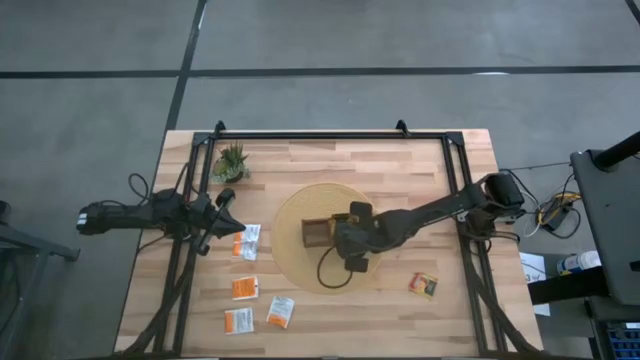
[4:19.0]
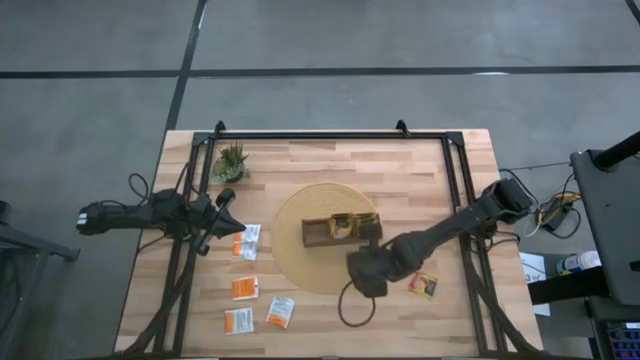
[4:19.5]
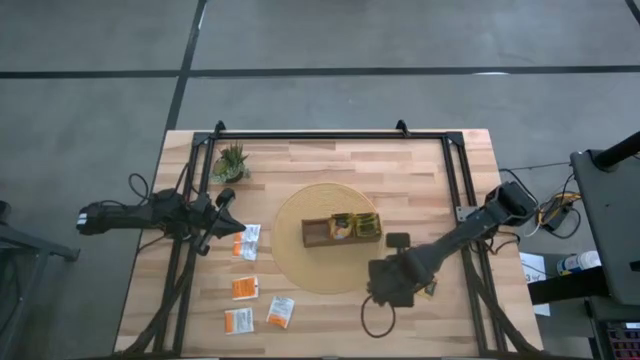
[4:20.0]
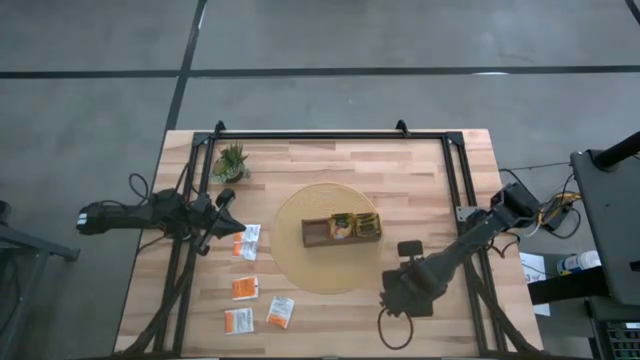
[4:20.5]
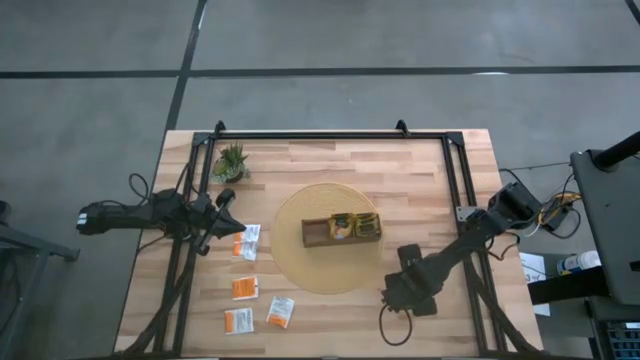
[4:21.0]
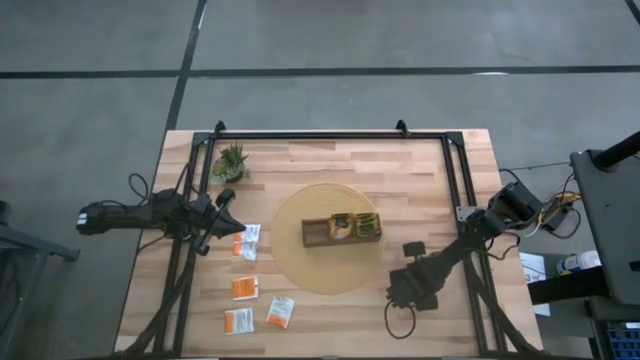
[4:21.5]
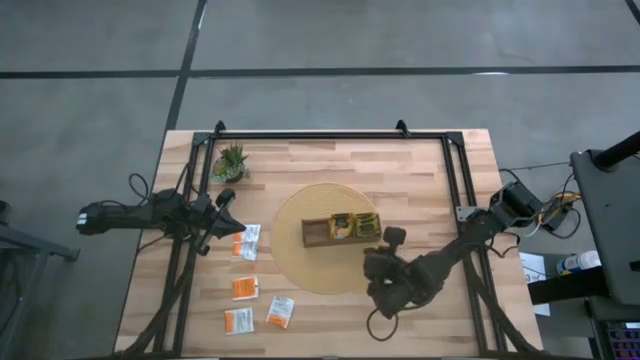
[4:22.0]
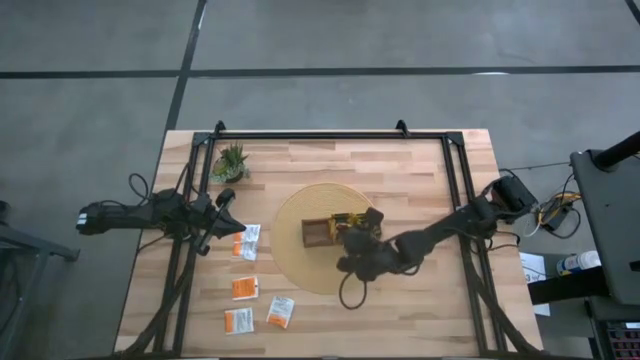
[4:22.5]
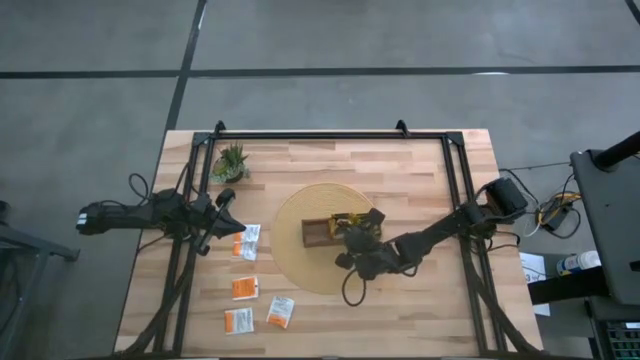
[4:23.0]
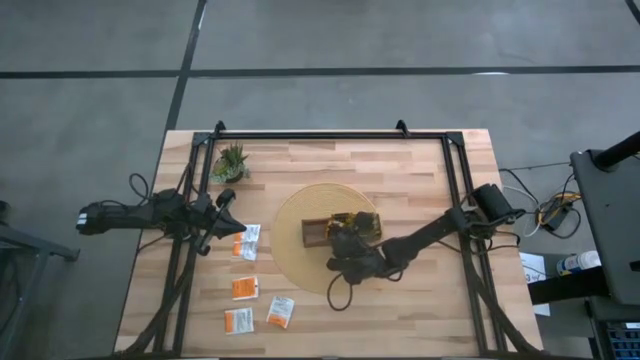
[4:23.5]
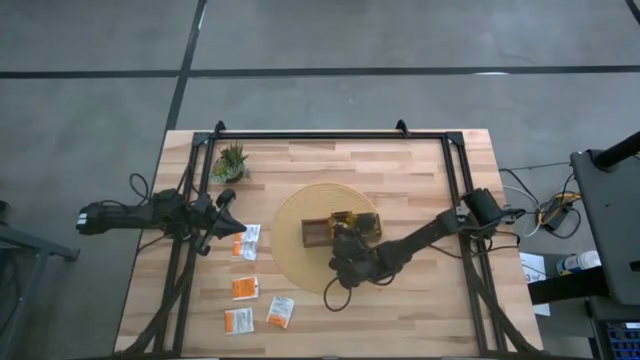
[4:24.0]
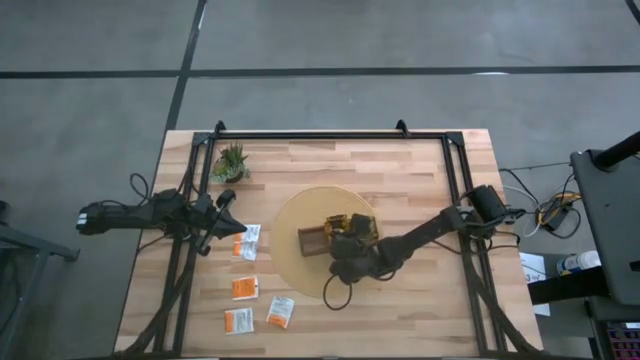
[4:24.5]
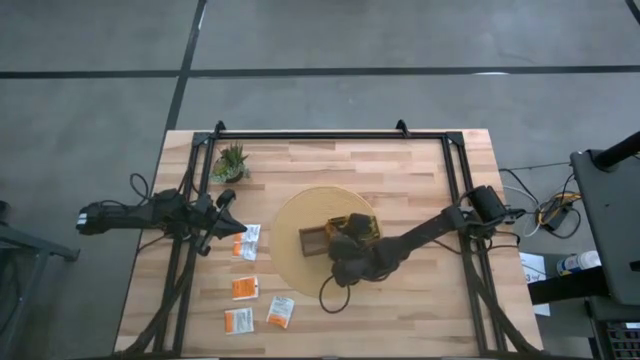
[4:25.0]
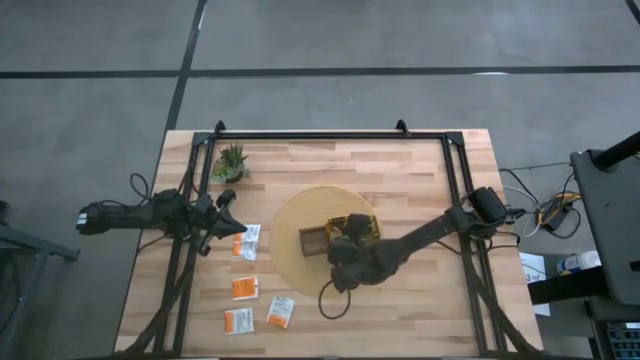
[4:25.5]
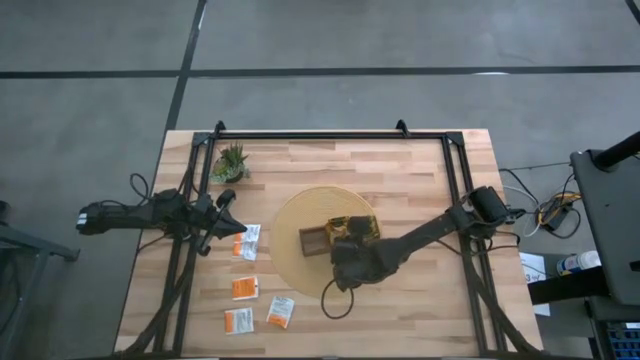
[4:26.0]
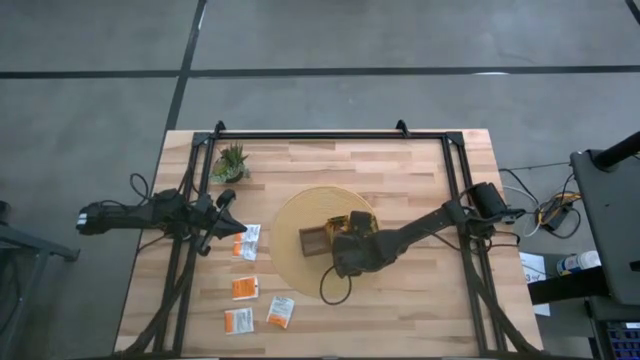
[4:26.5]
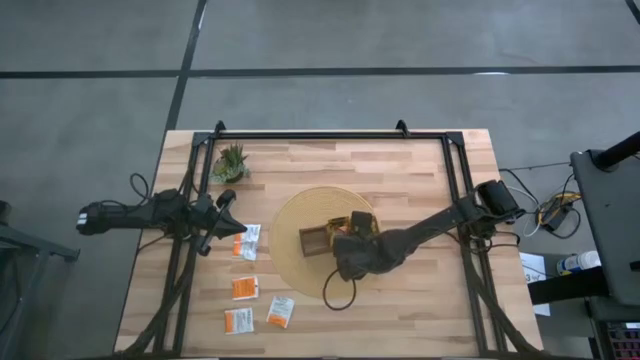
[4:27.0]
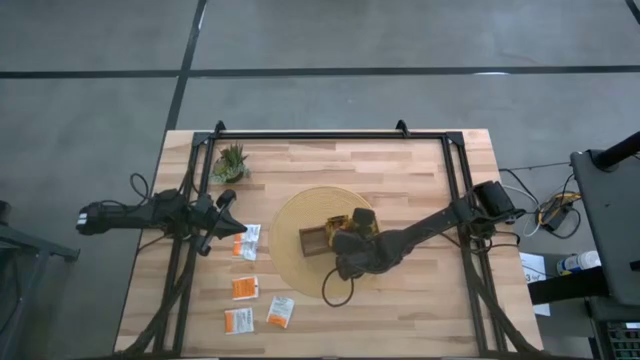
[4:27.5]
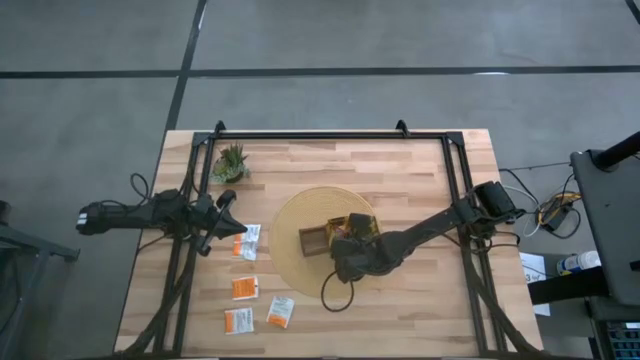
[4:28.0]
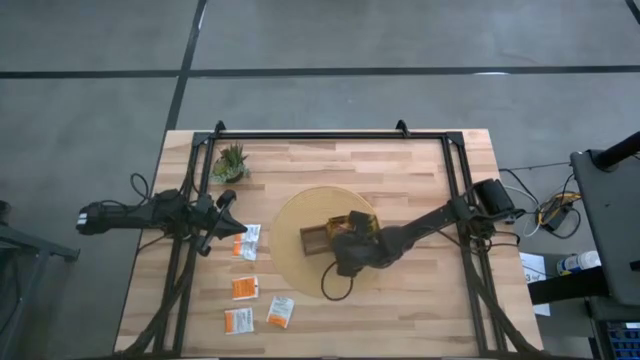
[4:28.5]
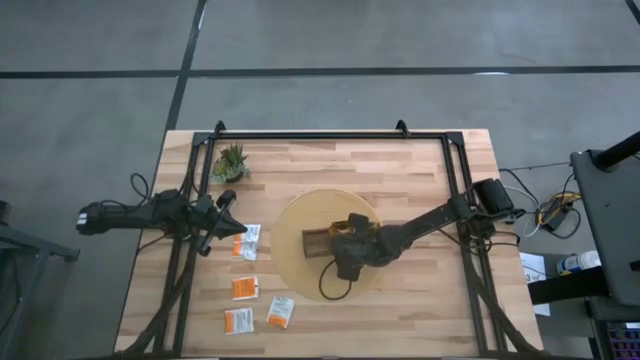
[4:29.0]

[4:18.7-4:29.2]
Task: Pick & Place Tea
Put the orange tea bag into the middle of the wooden organizer

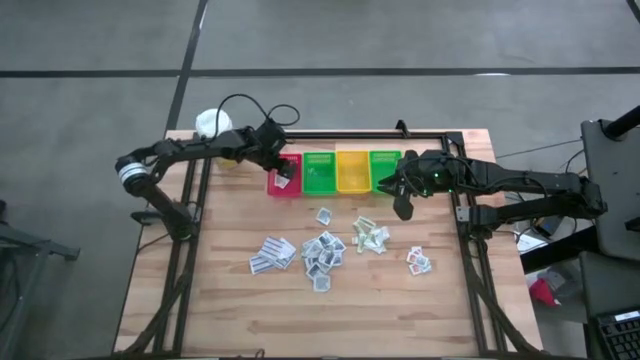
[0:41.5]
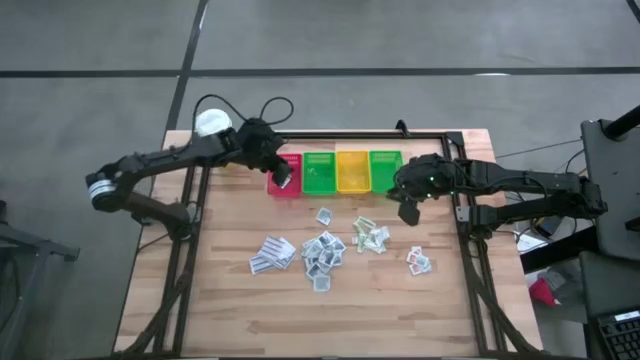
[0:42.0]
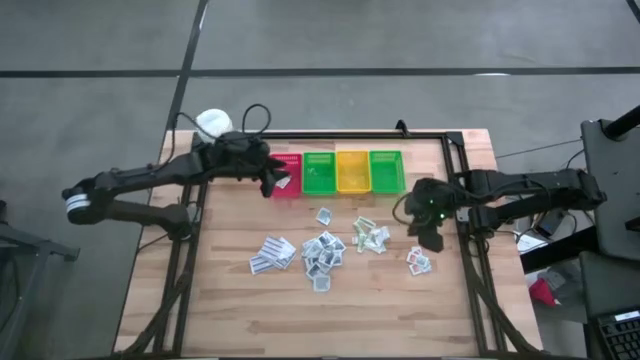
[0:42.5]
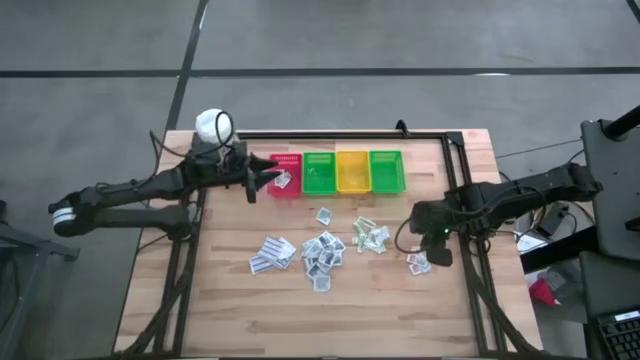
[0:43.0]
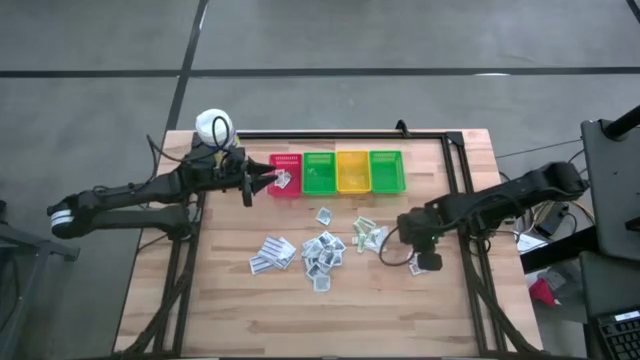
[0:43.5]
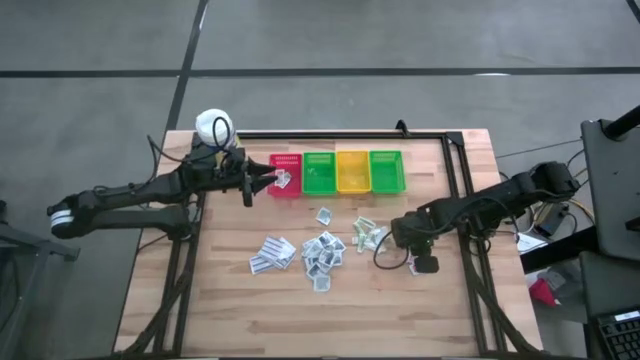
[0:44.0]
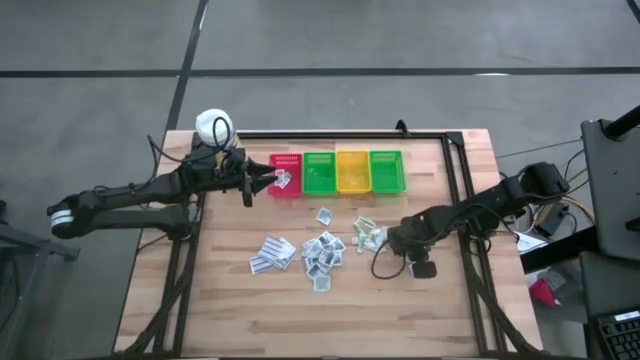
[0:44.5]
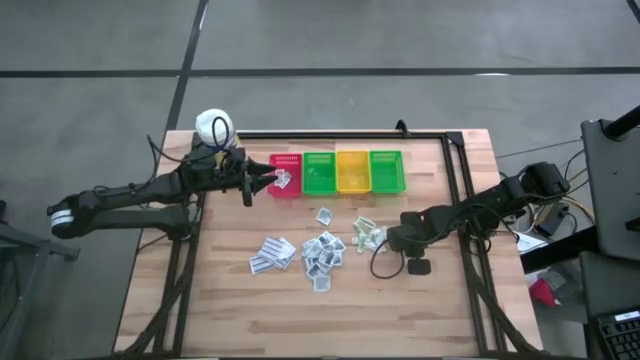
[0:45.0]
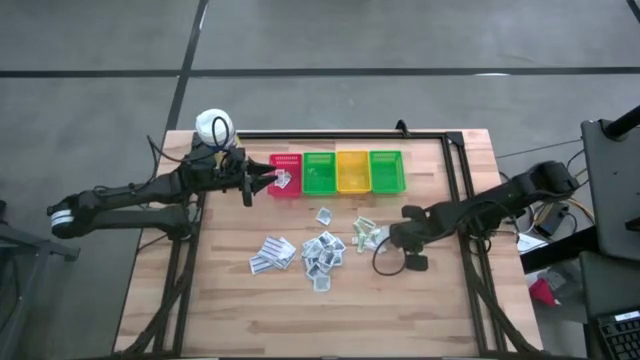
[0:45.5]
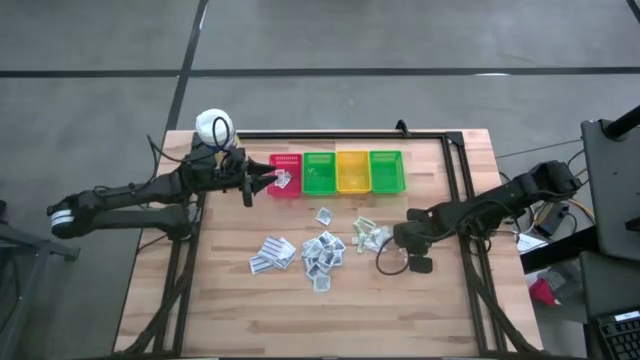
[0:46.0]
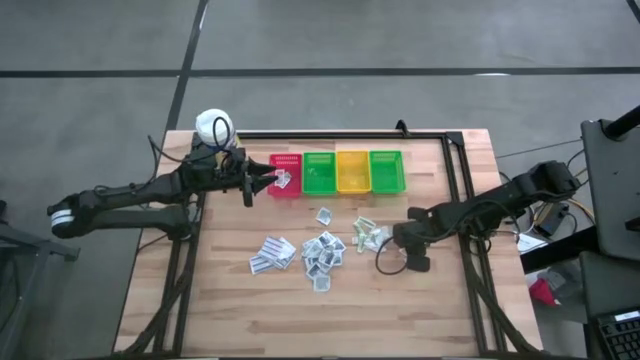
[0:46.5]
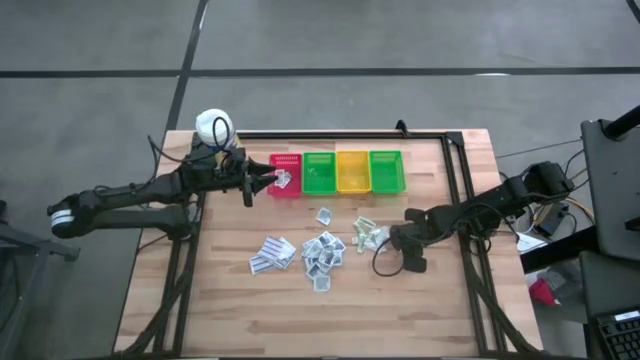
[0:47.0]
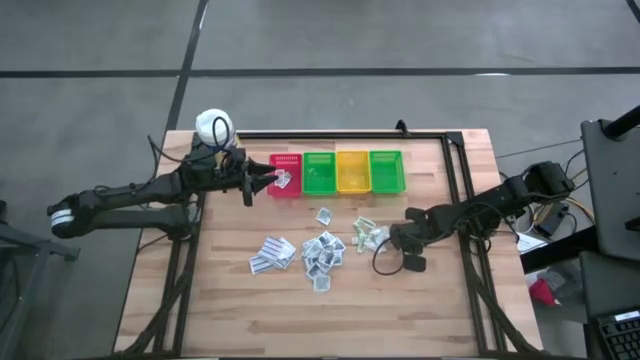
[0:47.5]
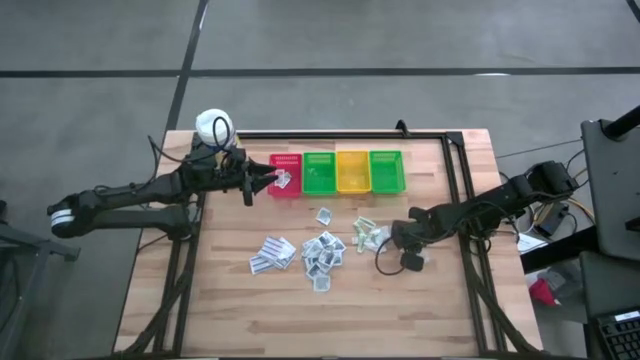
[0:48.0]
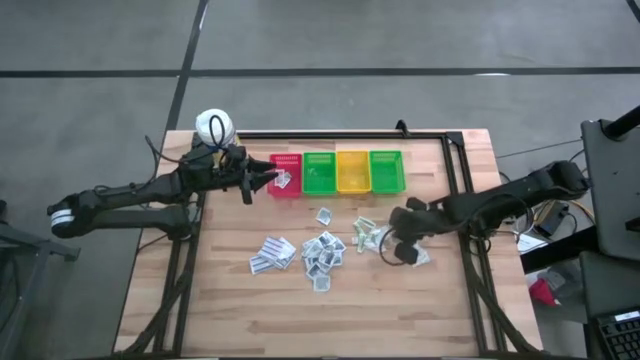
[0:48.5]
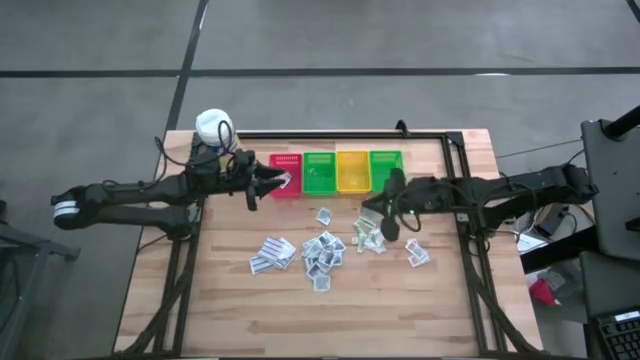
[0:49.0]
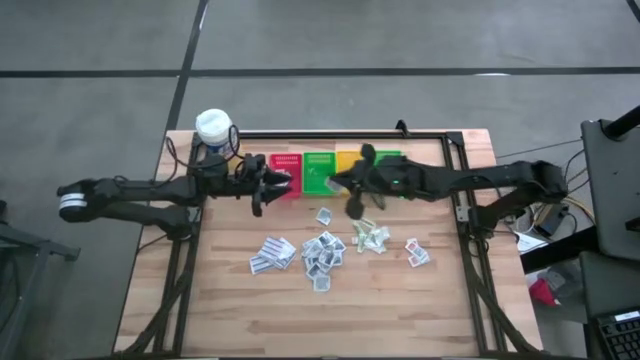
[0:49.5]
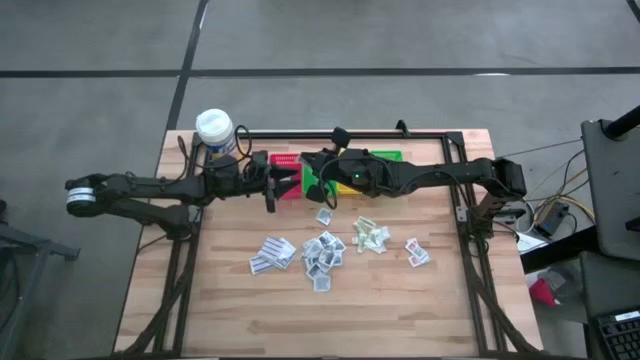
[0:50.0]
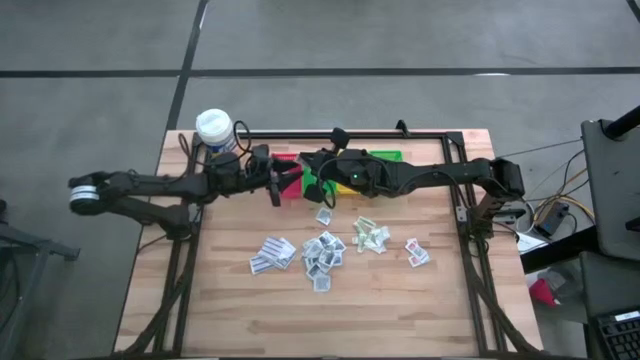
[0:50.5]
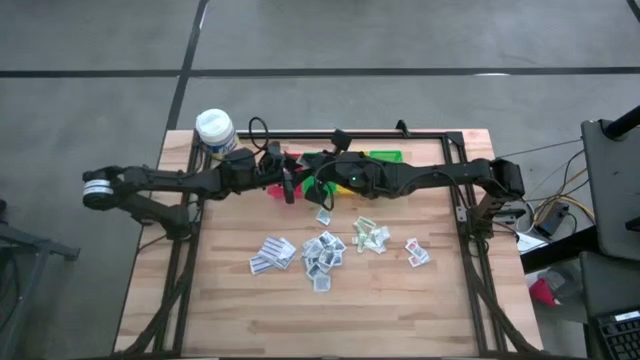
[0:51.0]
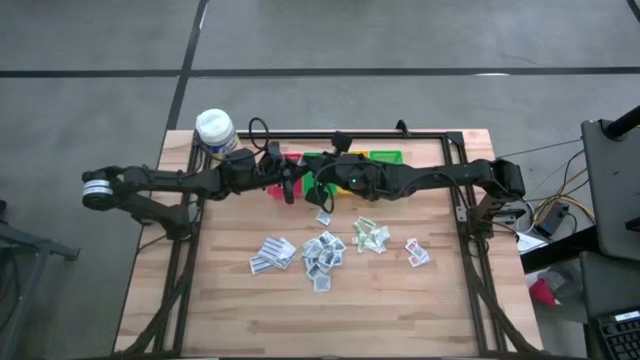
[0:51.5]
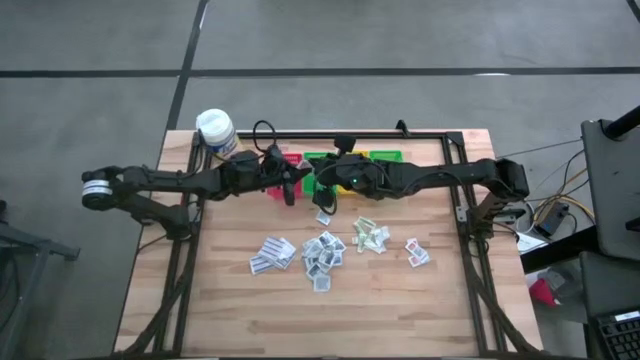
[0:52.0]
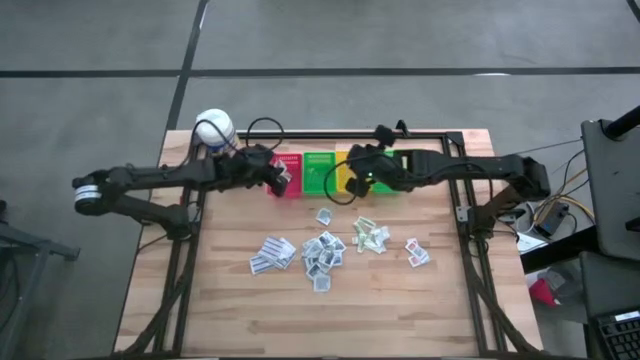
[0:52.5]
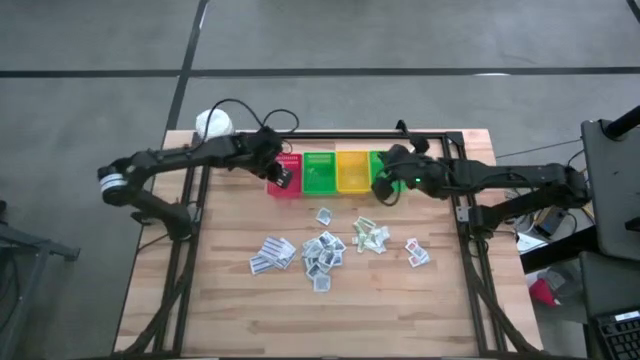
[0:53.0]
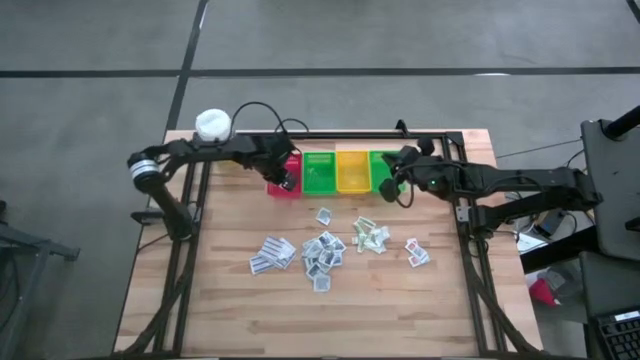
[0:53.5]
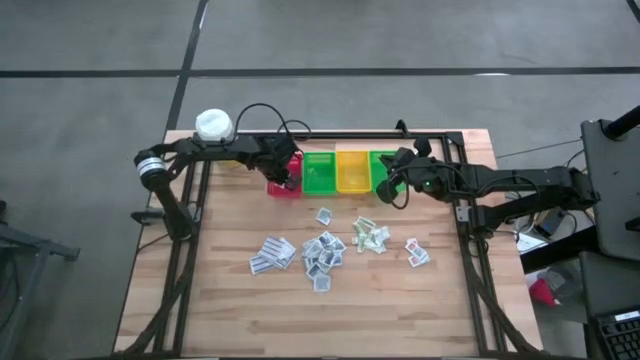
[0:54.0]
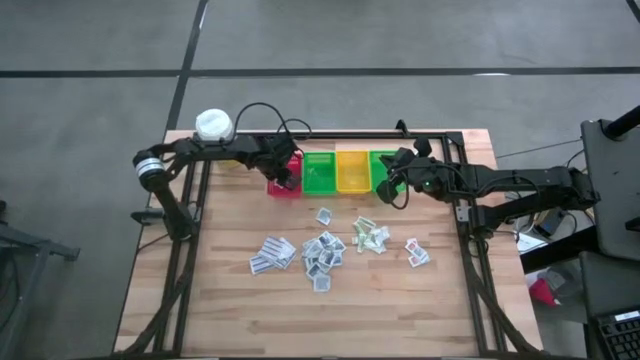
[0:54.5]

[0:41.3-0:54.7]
Task: Pick & Place First Aid Supplies
Put the ointment pack into the red bin
